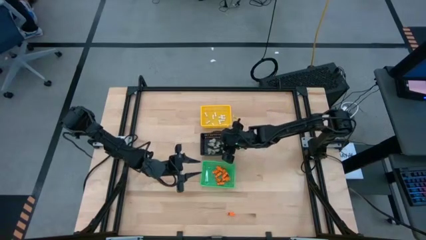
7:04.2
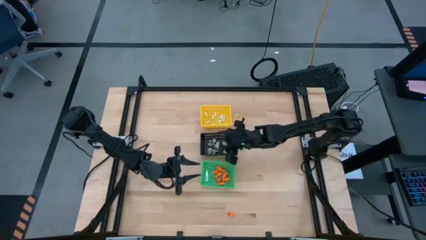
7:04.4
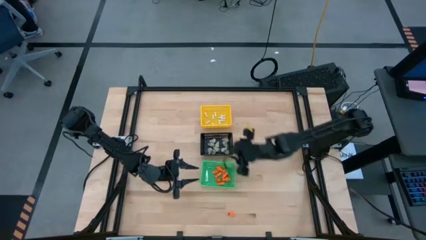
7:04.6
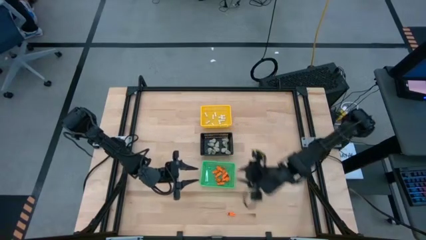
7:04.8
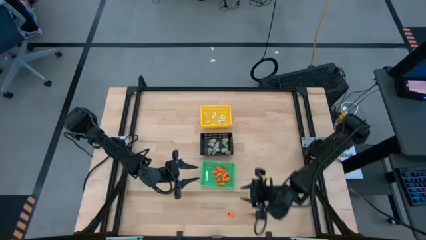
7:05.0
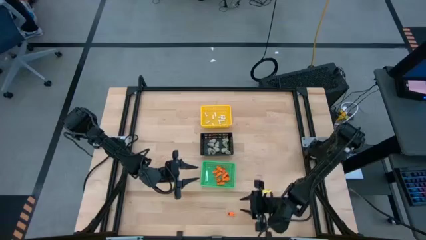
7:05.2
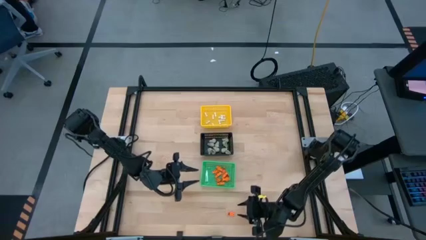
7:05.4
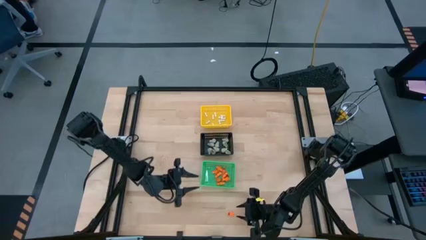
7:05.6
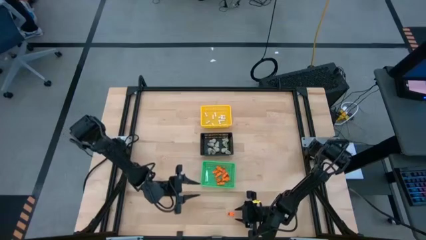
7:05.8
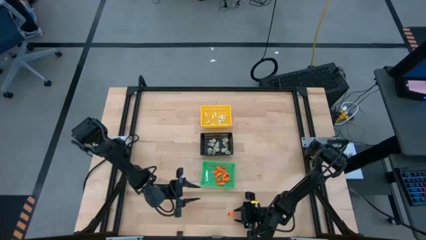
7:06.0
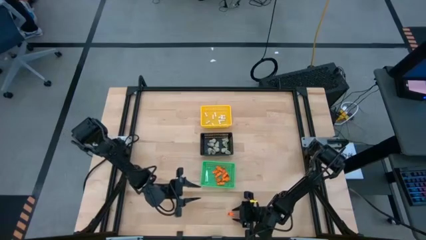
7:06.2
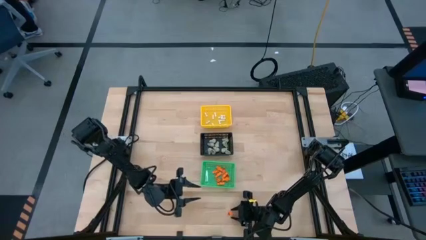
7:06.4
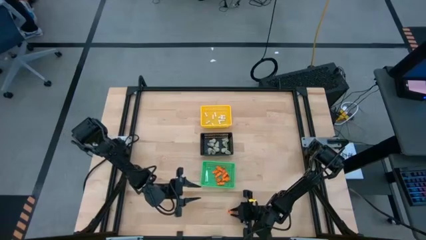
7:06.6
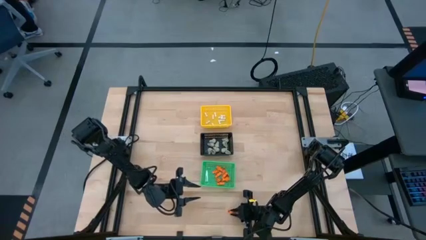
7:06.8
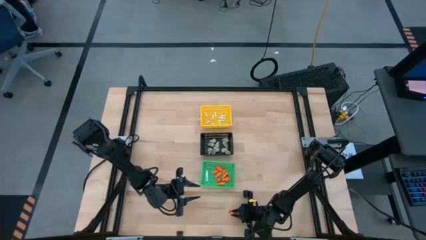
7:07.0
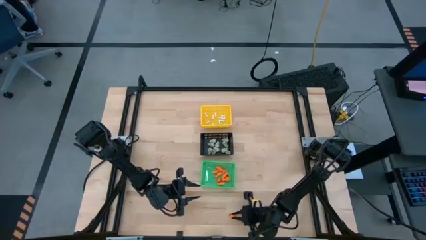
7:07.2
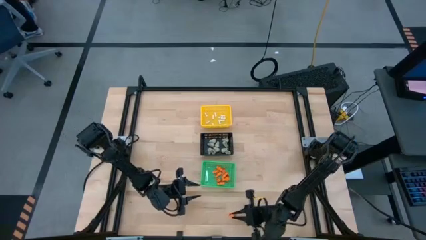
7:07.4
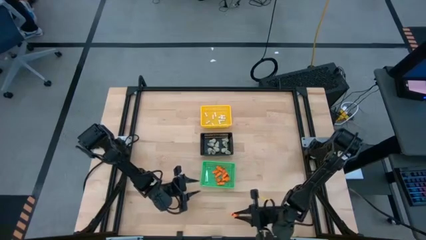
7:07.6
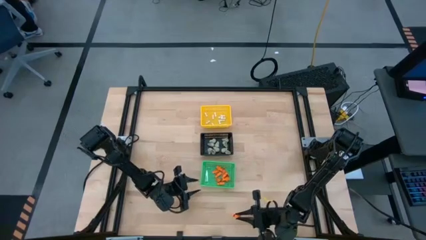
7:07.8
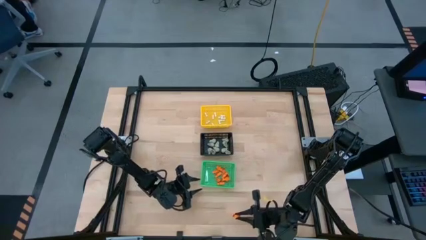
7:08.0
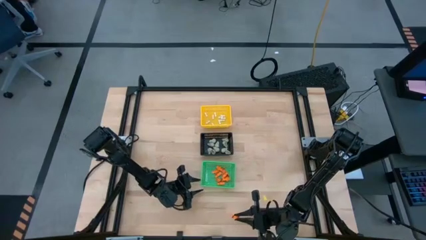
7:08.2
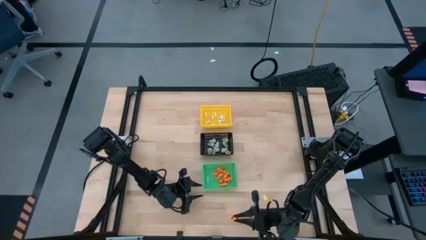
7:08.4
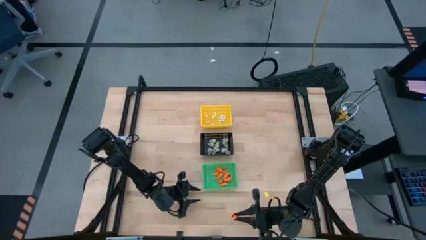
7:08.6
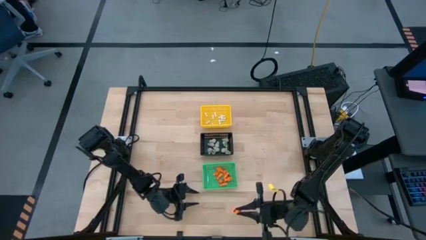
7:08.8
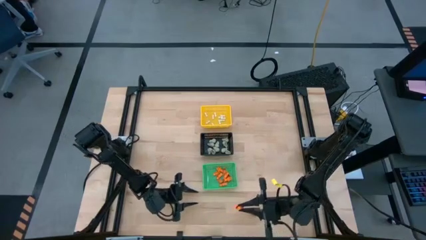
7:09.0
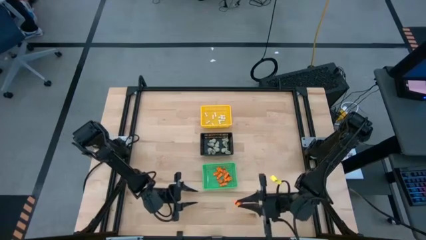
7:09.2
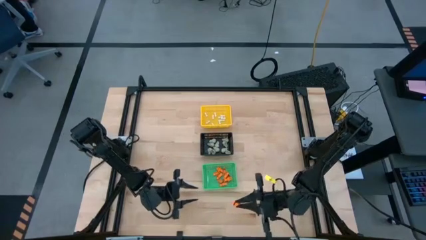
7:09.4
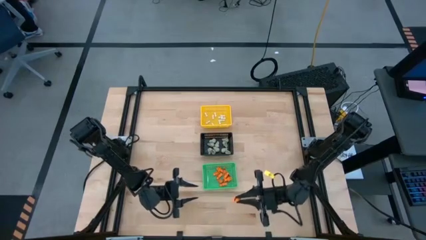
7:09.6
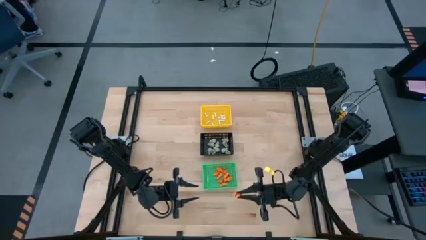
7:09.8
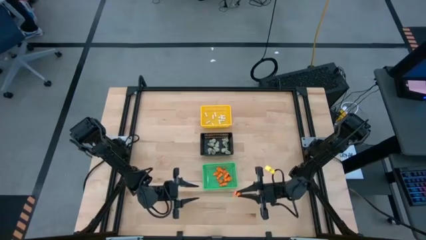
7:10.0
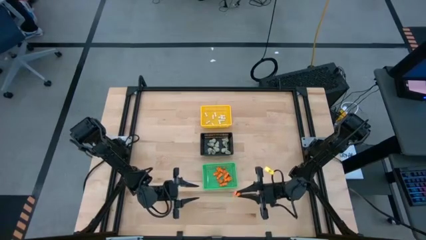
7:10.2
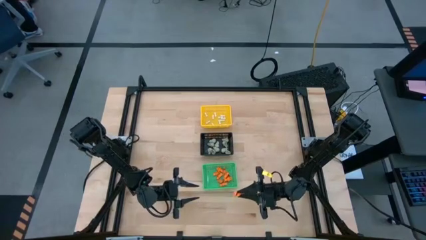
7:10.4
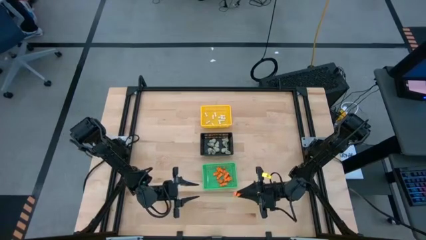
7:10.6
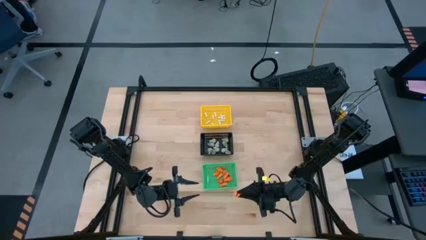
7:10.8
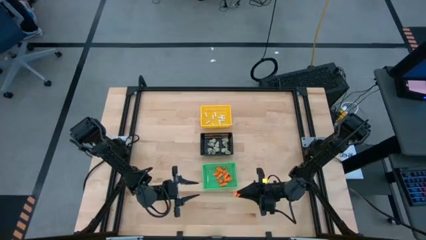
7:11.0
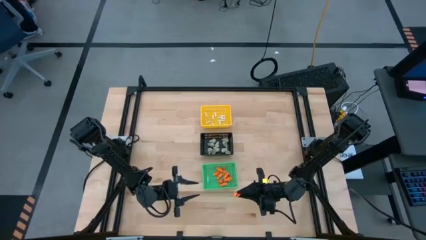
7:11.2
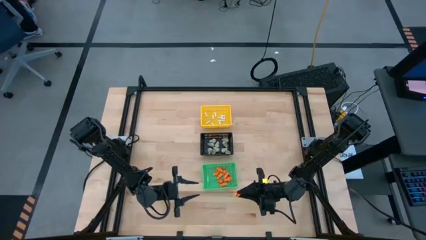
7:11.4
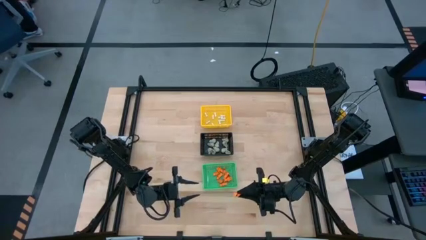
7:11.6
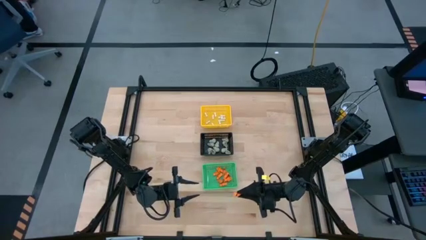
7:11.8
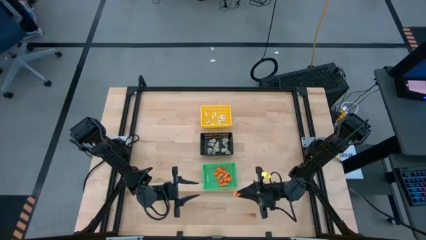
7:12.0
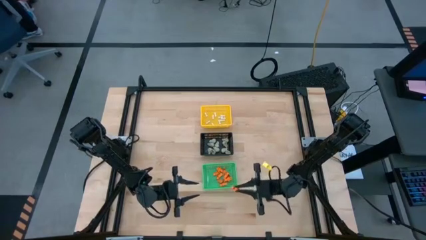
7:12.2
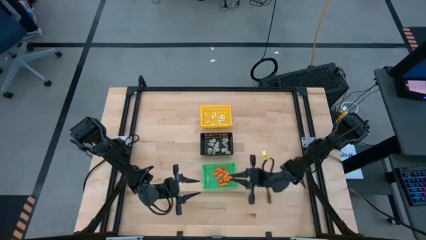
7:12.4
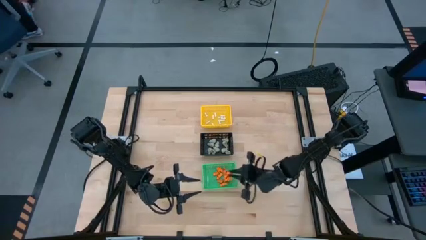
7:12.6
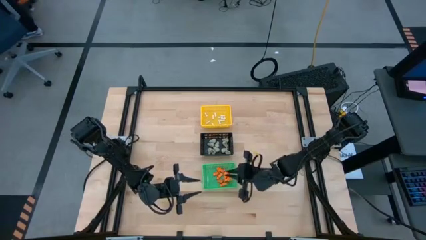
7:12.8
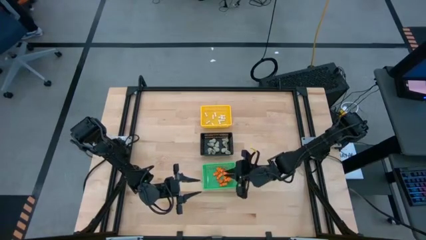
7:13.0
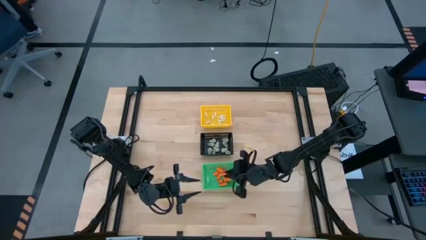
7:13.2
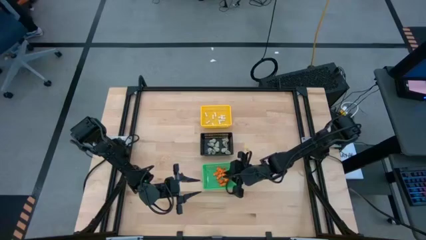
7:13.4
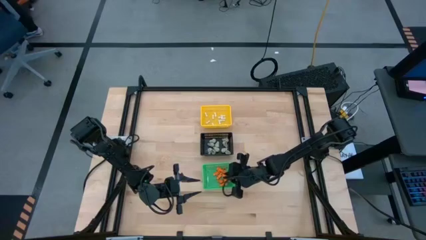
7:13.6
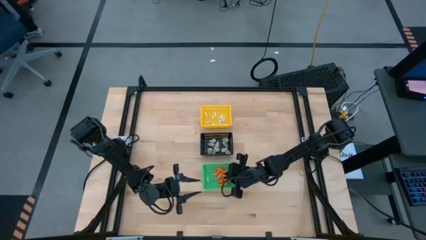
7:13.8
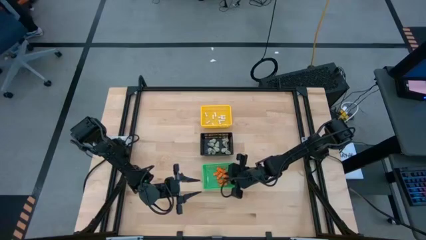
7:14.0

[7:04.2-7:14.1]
Task: Sort Halloween decoration
Put the orange skeleton toy into the green basket

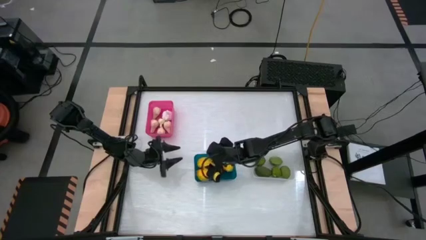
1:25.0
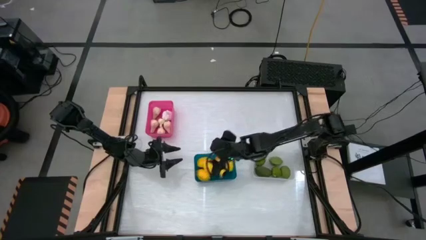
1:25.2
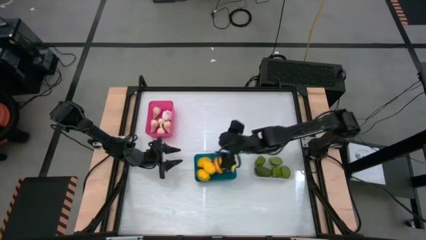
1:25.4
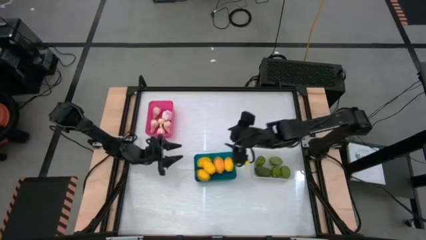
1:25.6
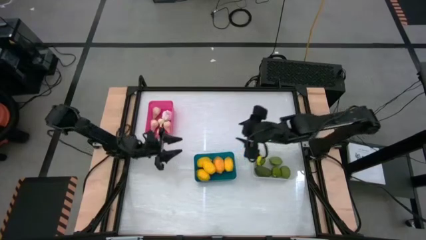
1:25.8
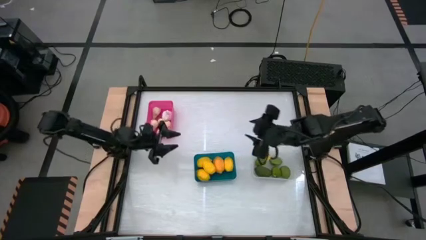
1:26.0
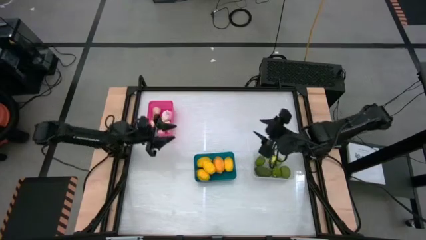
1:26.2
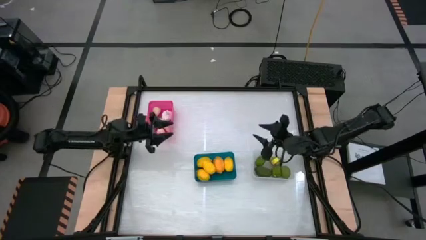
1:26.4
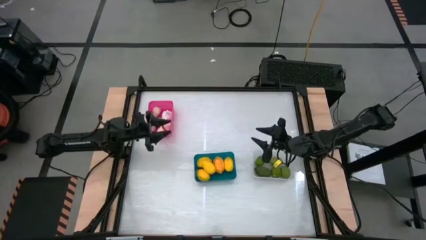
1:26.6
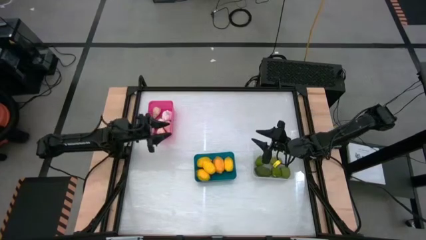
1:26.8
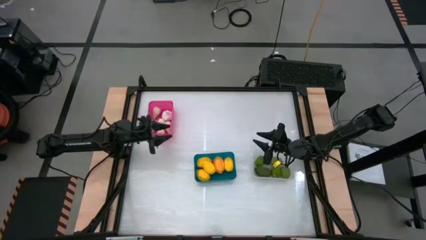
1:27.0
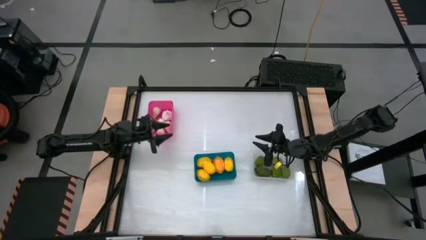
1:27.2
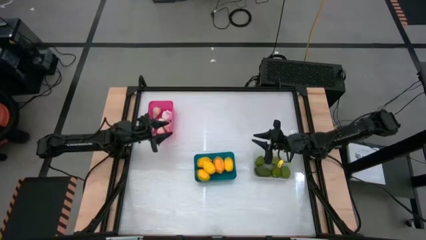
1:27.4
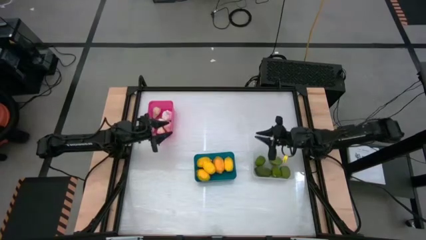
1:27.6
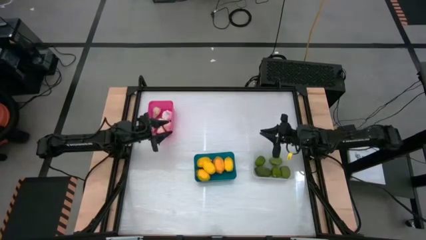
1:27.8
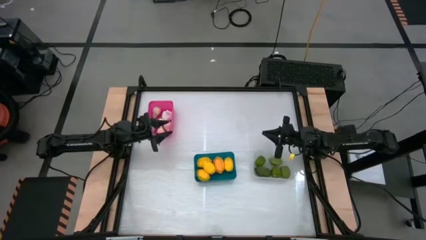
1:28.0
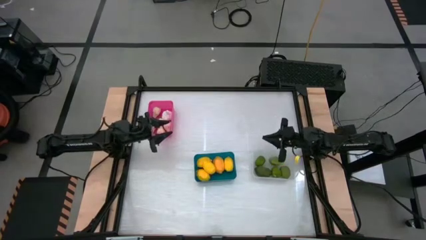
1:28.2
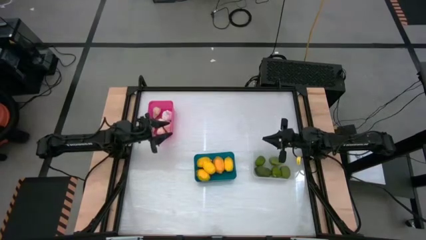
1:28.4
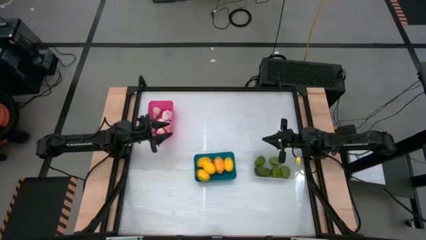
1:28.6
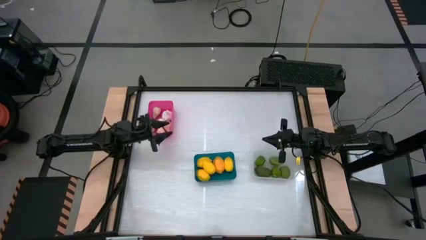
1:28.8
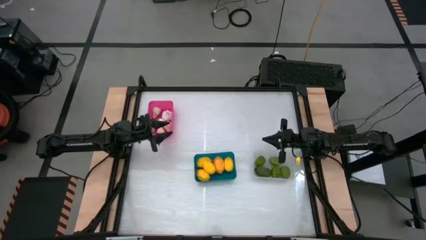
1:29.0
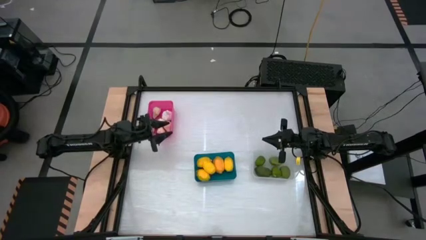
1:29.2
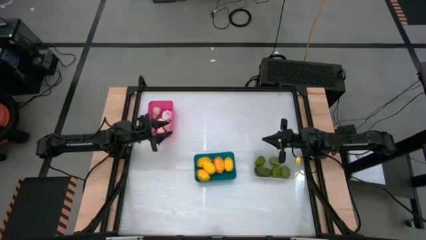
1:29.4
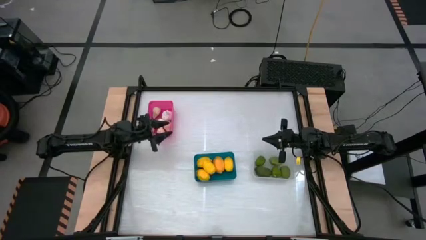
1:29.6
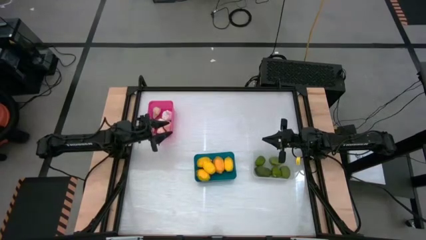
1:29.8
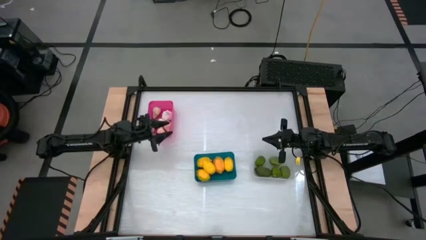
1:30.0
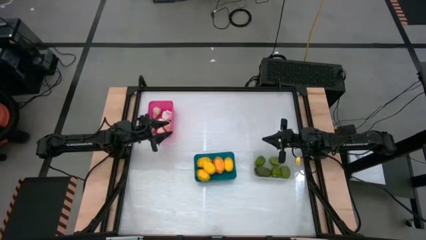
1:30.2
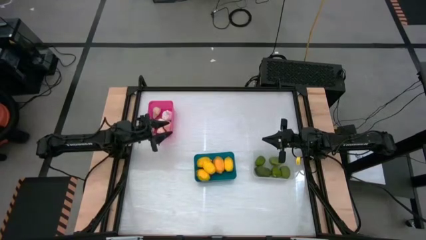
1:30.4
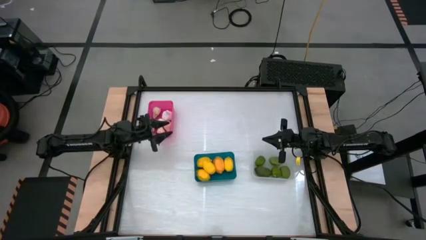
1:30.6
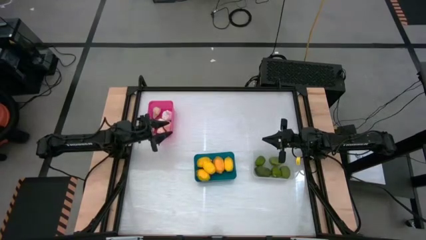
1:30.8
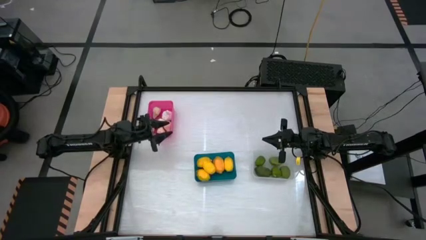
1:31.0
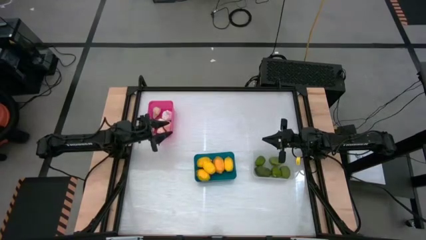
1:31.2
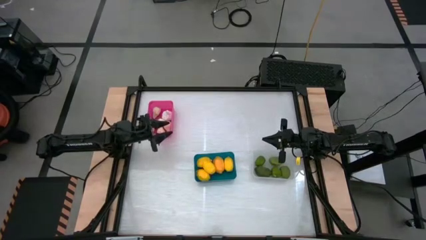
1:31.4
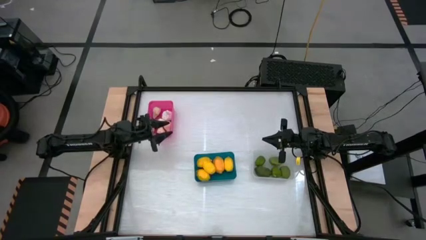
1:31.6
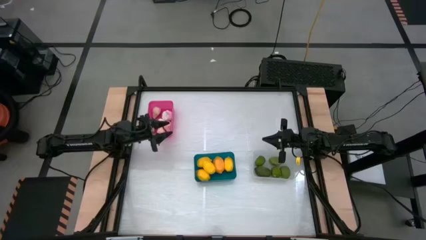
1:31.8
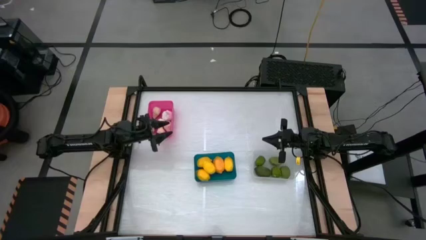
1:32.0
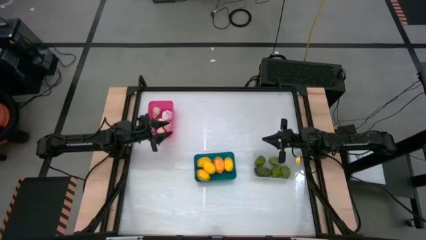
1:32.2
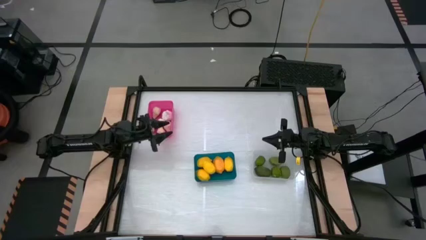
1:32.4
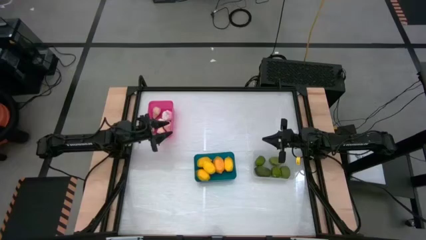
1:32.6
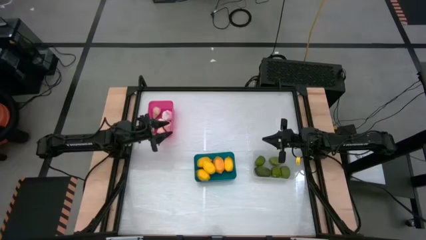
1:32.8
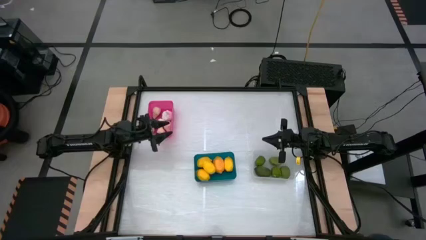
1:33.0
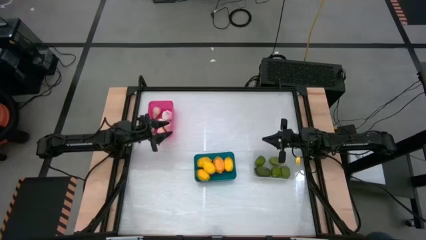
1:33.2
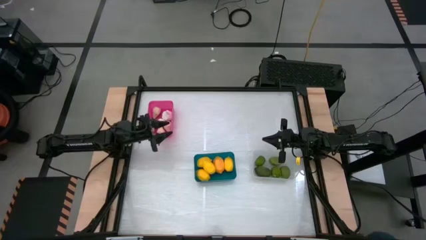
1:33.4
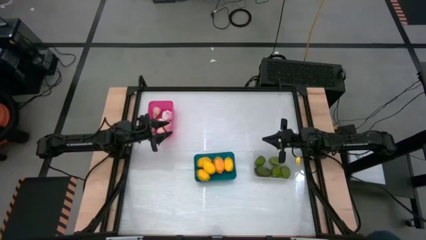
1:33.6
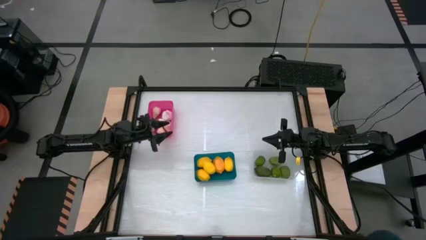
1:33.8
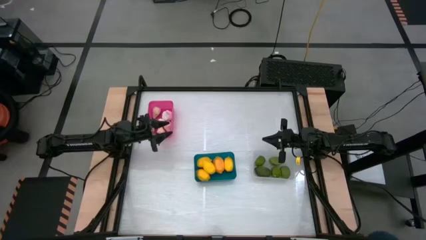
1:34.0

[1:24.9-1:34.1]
Task: Sort produce into baskets
Return to Home Position
